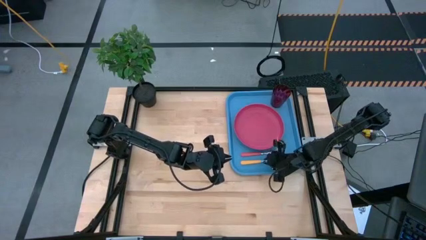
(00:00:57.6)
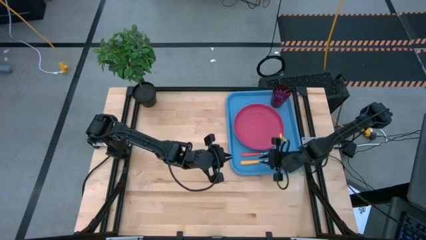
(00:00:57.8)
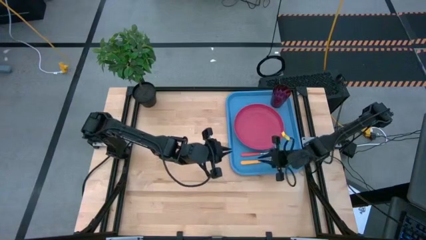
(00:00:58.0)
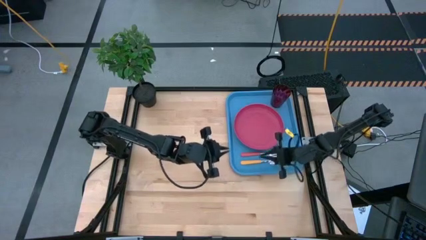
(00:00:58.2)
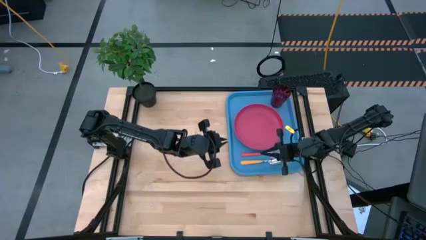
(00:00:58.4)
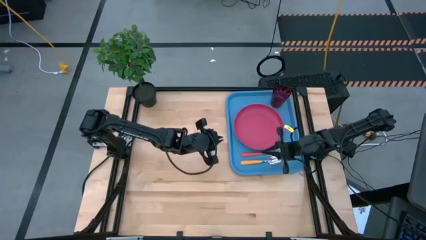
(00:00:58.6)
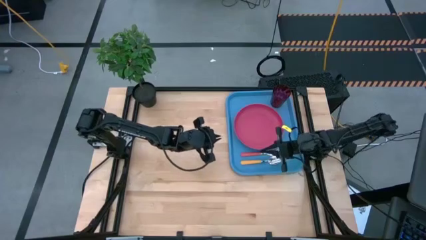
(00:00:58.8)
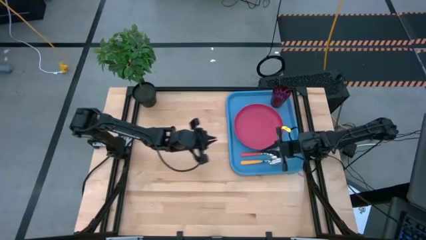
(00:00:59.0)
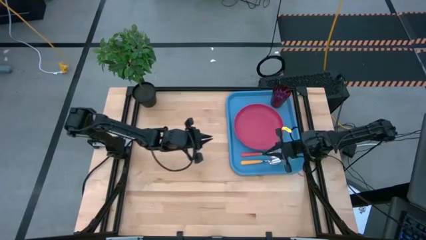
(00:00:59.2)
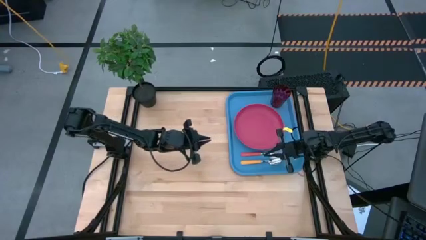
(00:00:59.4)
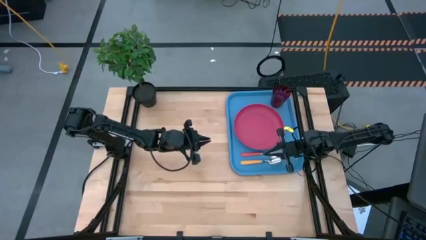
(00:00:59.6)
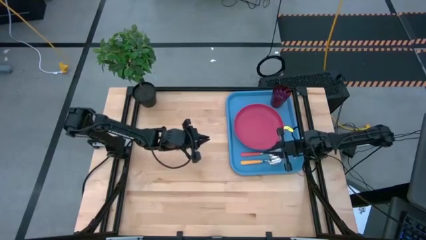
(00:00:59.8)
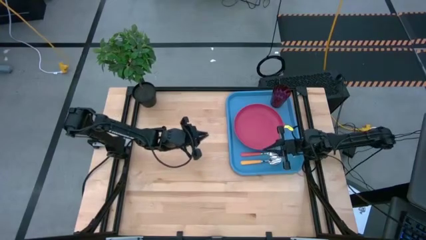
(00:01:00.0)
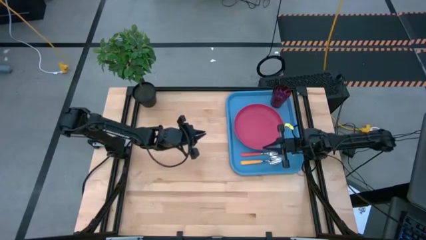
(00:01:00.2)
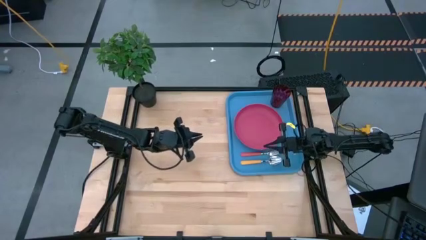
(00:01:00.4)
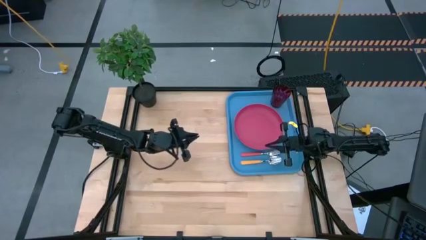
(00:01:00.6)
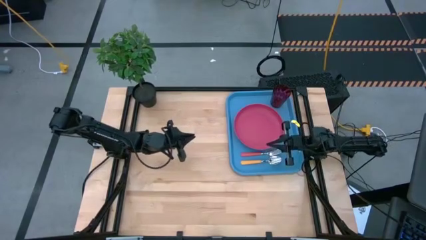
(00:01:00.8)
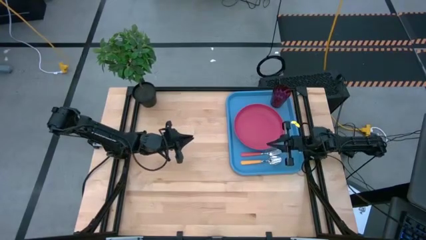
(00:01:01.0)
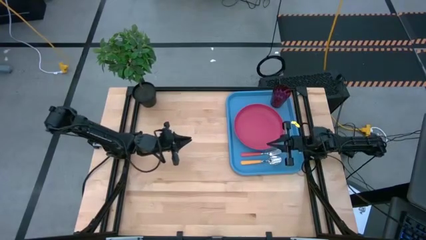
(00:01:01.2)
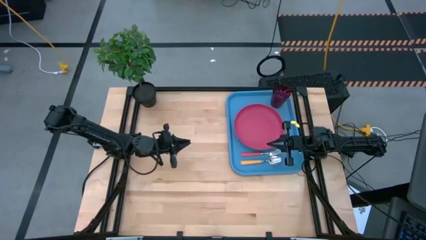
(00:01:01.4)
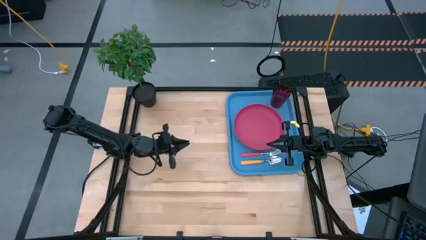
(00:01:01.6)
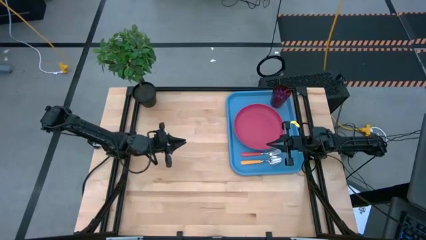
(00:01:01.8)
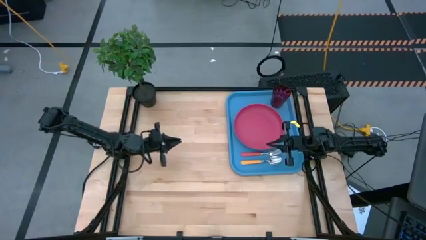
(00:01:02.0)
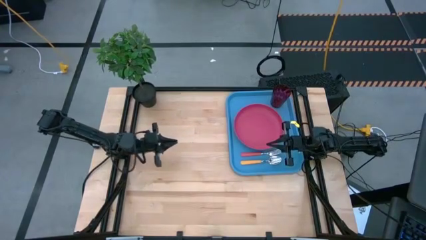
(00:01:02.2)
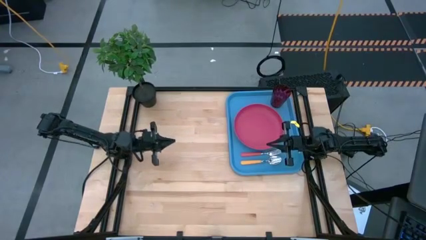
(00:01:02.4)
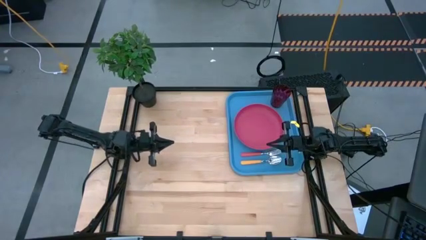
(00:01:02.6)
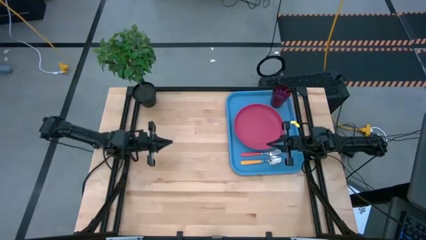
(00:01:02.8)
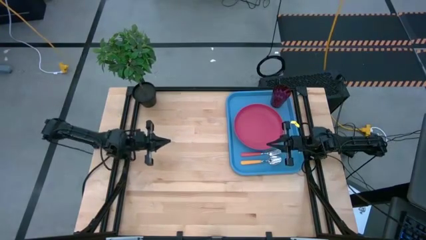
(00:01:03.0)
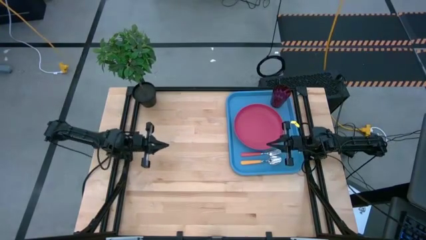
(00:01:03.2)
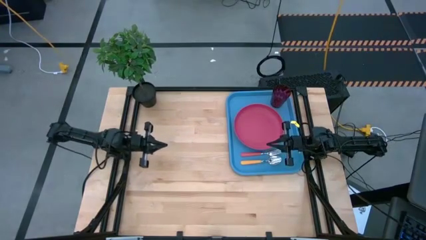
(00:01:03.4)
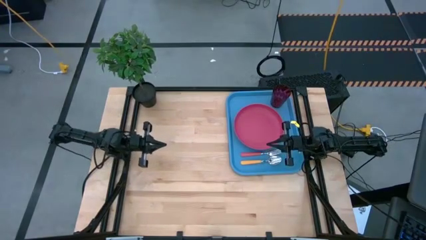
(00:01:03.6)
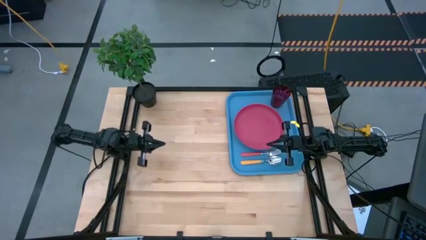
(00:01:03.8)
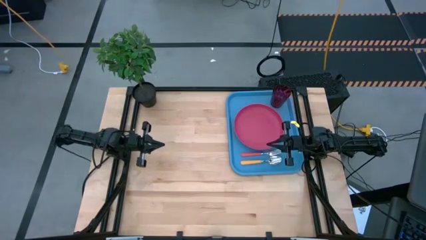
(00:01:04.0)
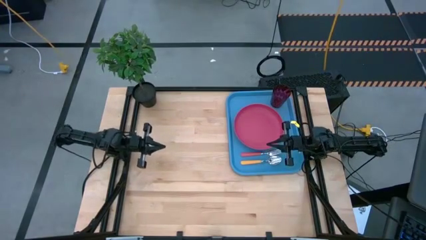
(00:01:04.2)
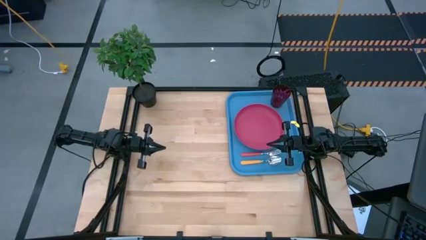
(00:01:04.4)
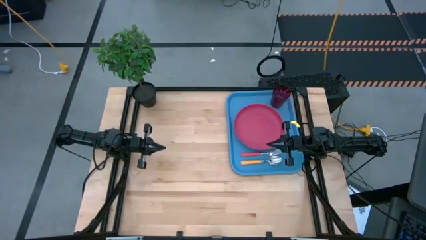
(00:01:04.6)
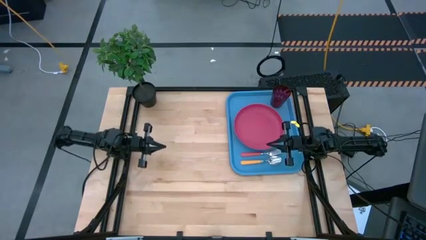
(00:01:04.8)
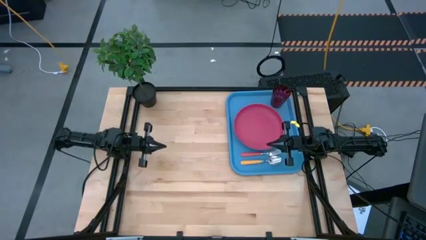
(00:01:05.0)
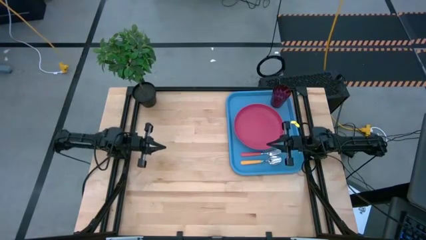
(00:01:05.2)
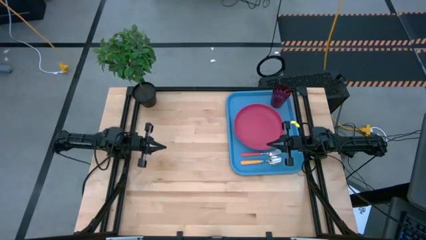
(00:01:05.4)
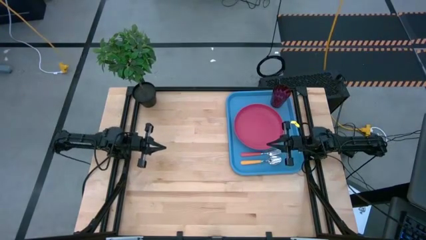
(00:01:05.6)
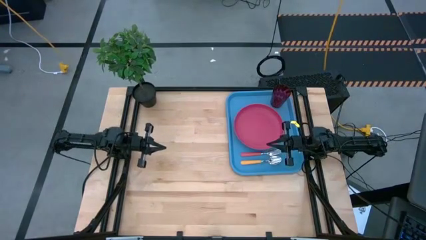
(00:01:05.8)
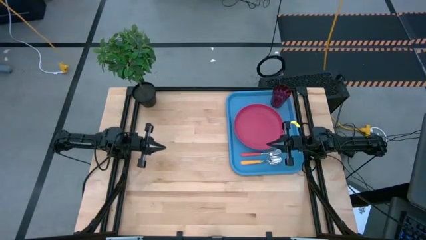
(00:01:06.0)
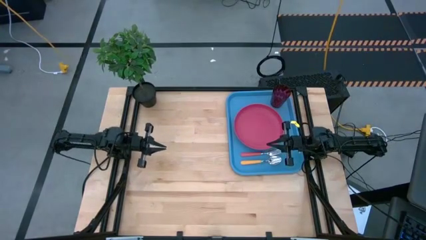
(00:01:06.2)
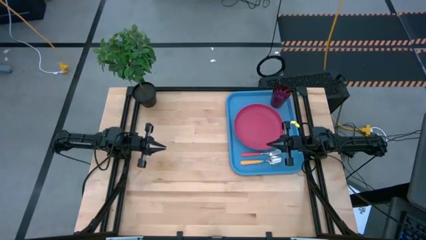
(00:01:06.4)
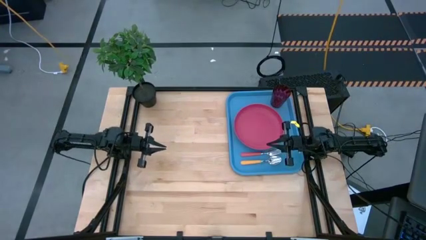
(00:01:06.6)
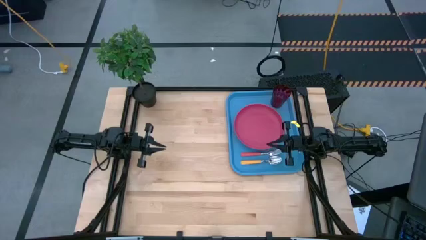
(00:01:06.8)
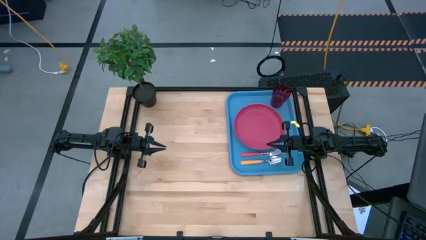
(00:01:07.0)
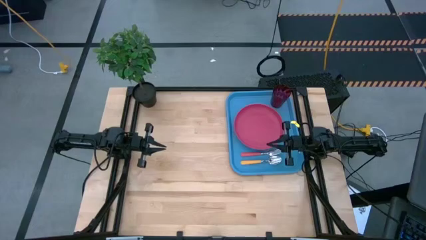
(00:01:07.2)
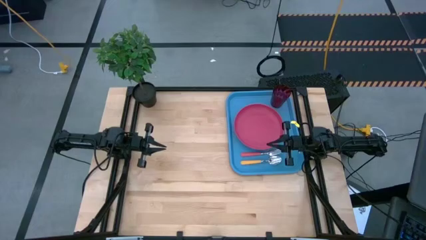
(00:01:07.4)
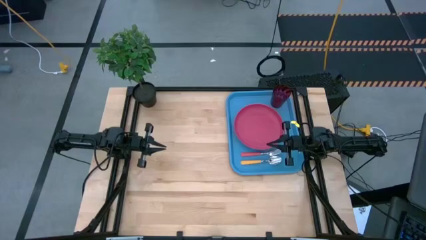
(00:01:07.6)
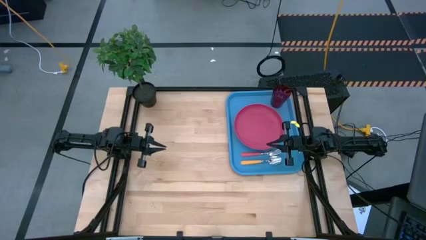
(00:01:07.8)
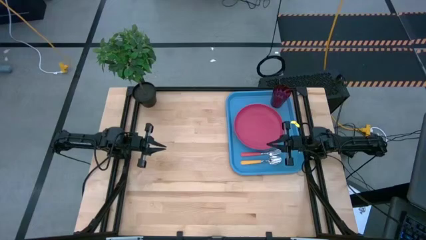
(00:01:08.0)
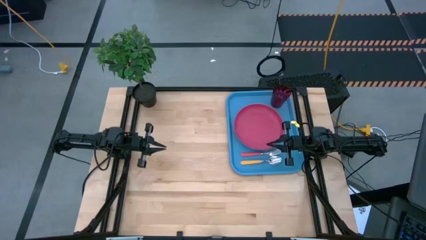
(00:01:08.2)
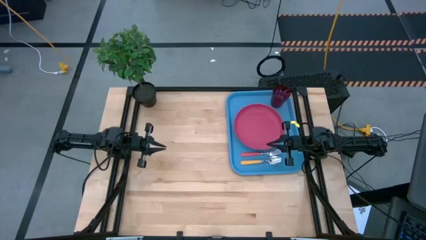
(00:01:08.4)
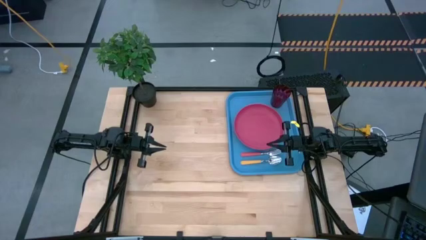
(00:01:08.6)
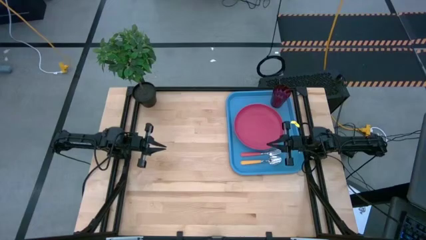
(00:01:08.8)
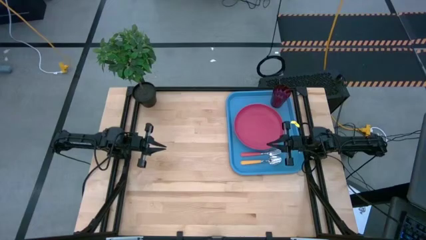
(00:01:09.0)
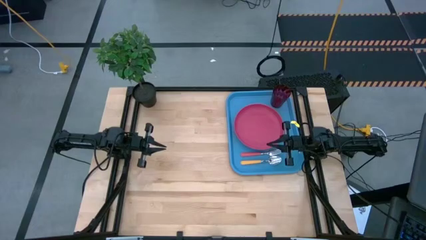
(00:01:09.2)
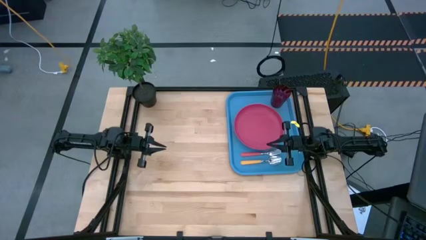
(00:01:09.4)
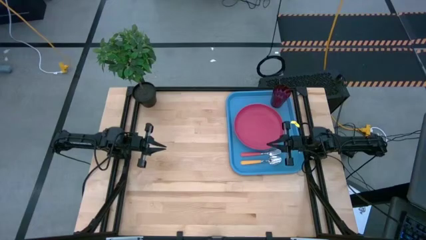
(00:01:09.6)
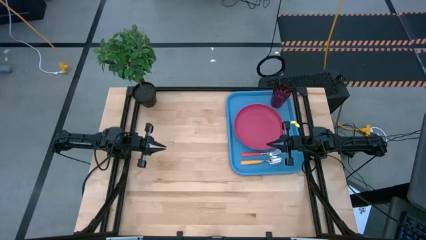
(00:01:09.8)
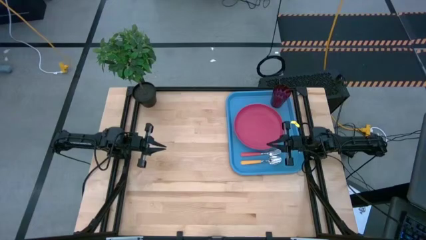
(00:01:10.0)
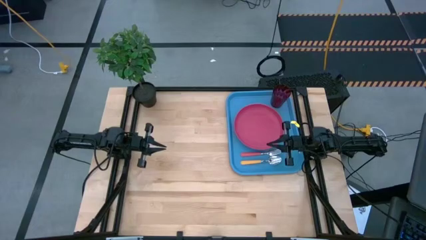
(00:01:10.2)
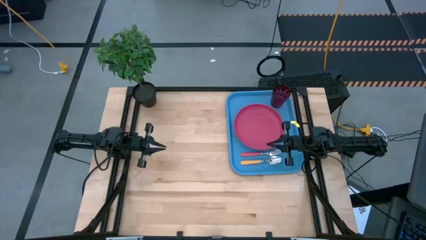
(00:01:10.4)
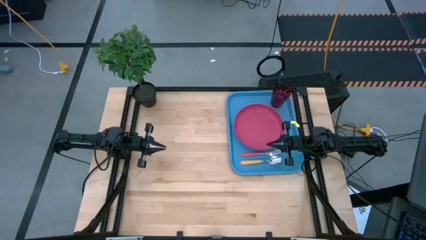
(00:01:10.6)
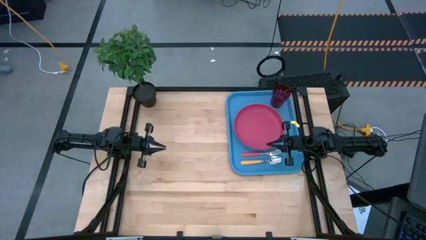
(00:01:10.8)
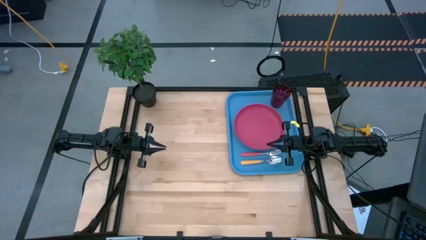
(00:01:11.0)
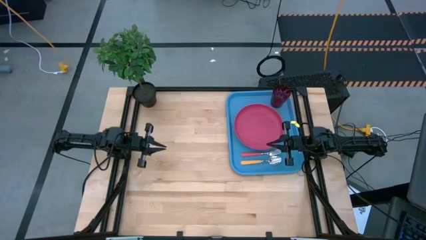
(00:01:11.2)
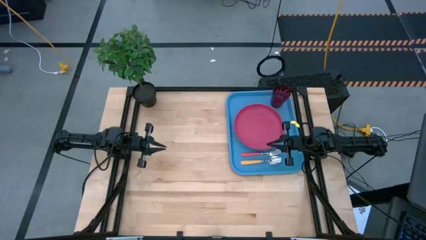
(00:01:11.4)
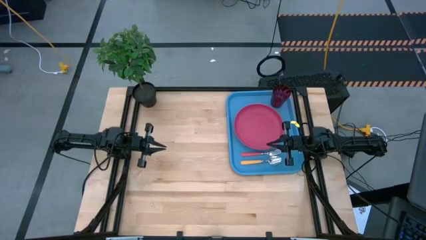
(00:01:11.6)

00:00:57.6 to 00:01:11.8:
Task: Pick and place plate/cup/fork/spoon on tray
Return to Home Position

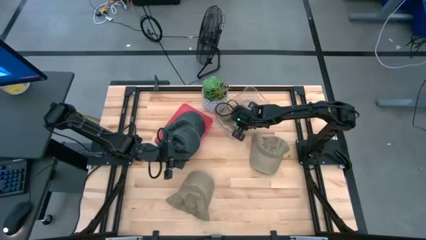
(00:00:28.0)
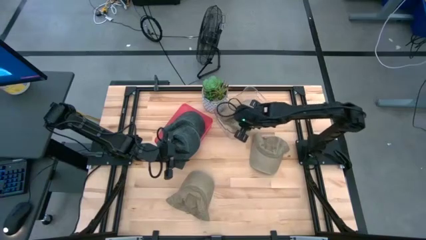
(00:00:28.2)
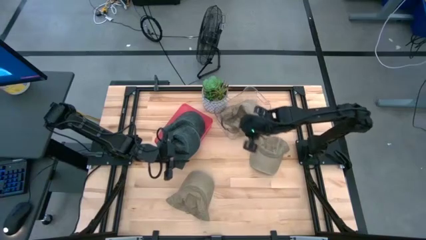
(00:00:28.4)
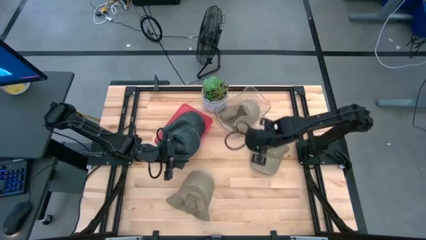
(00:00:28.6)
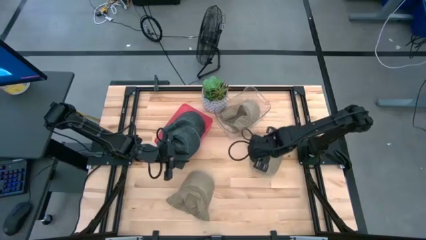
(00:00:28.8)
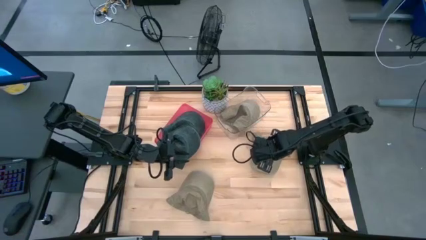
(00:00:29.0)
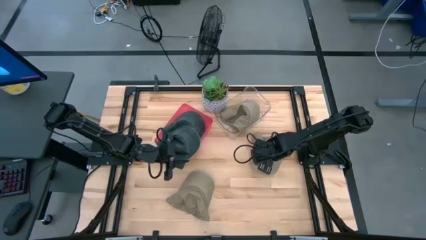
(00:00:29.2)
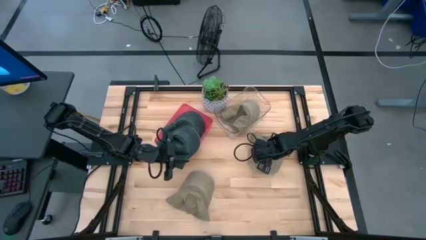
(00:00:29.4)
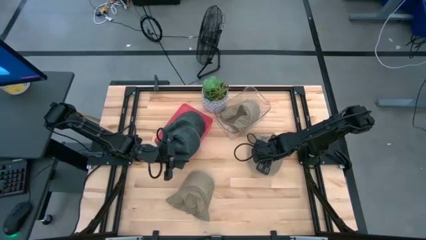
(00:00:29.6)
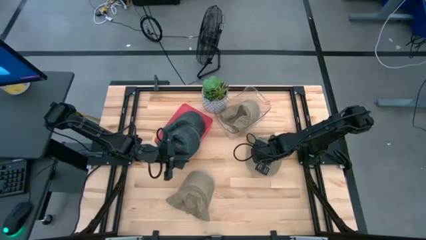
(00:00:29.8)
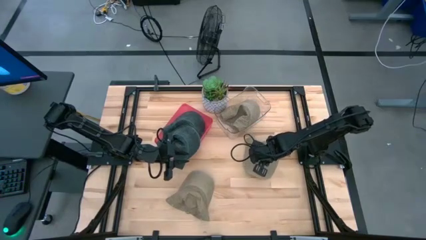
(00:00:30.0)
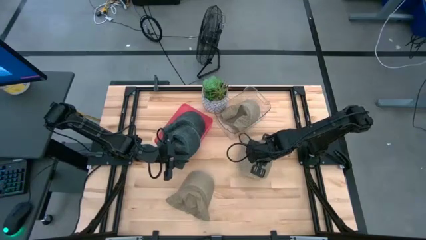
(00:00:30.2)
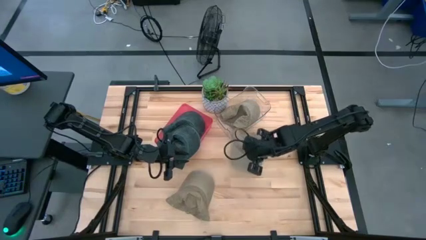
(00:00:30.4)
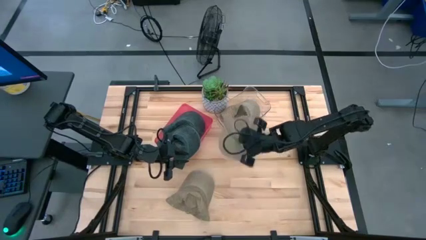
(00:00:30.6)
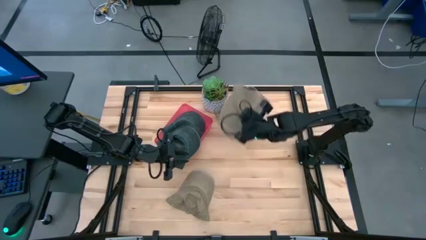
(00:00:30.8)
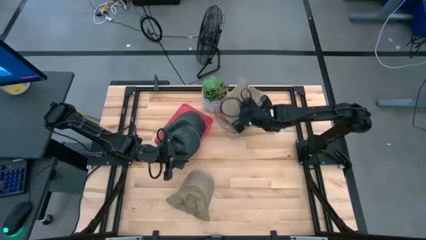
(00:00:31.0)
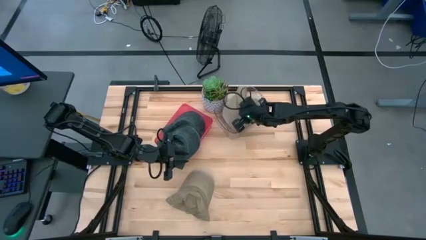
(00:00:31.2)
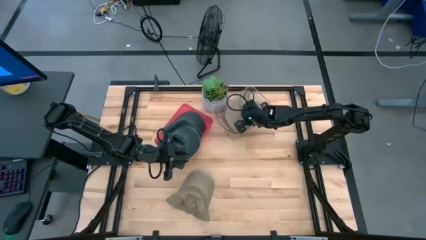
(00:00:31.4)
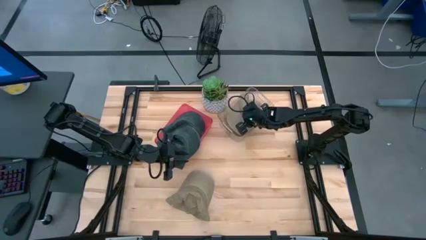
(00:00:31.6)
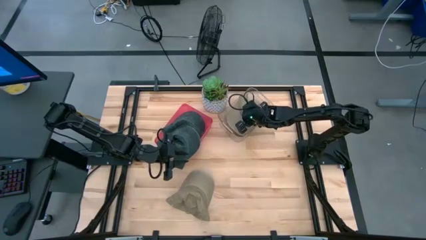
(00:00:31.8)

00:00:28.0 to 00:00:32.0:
Task: Pick & Place hat
Put the top brown cap into the transparent bin
